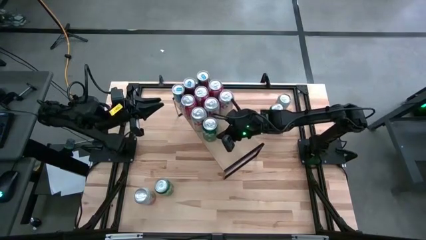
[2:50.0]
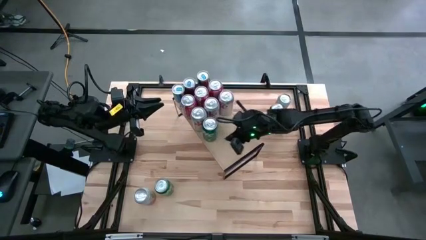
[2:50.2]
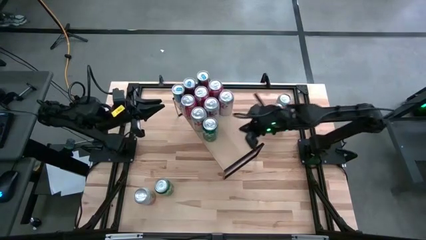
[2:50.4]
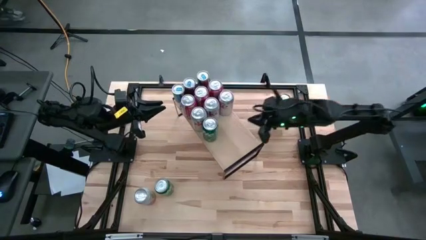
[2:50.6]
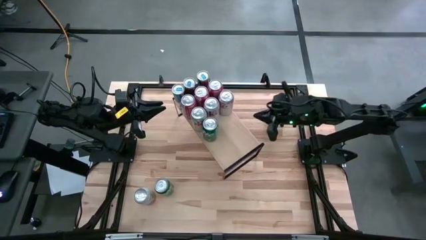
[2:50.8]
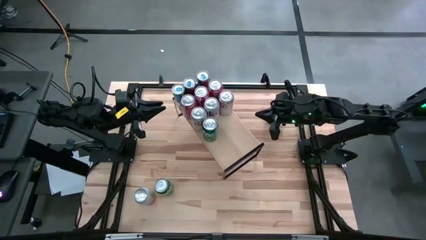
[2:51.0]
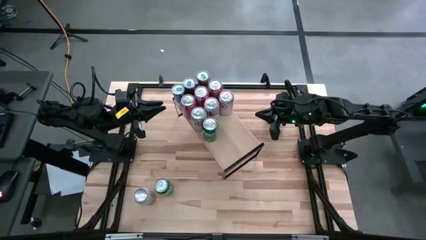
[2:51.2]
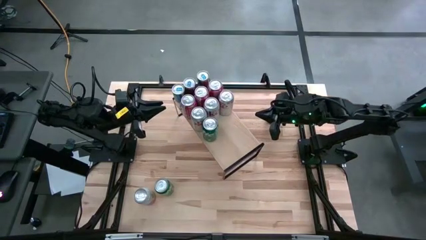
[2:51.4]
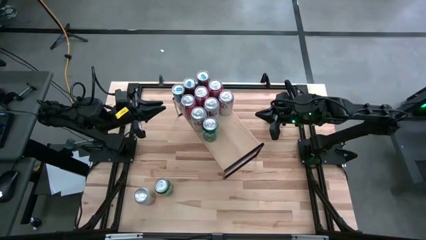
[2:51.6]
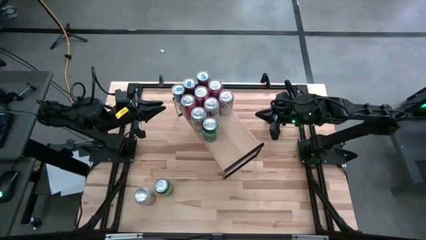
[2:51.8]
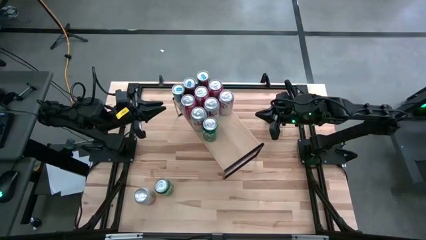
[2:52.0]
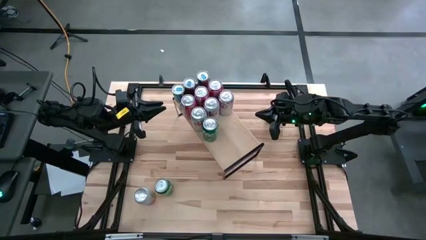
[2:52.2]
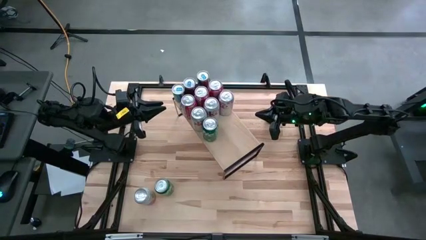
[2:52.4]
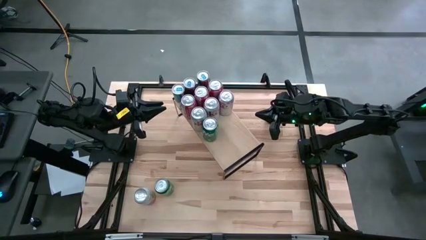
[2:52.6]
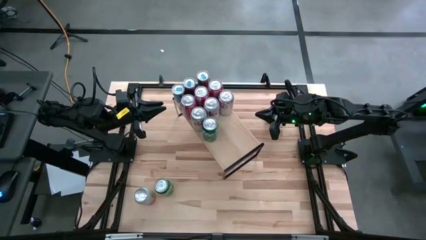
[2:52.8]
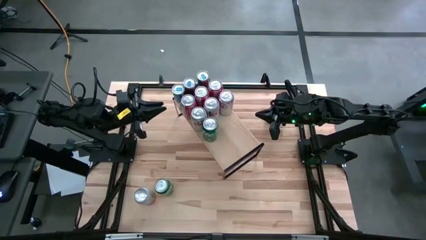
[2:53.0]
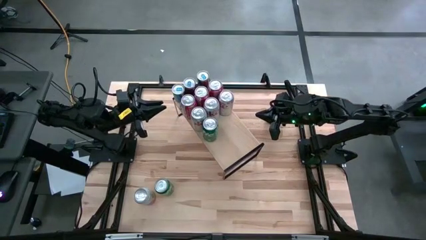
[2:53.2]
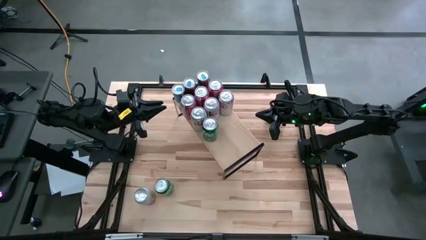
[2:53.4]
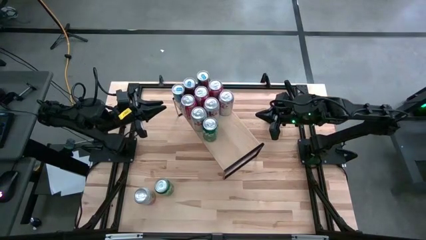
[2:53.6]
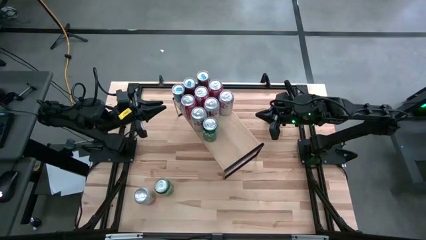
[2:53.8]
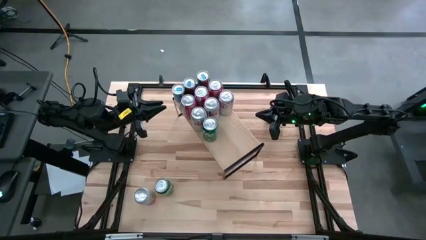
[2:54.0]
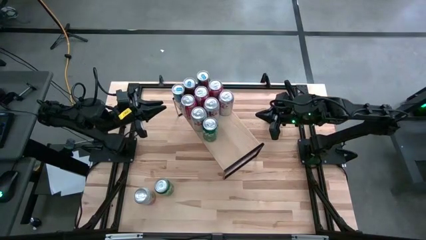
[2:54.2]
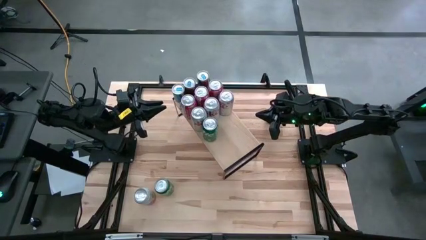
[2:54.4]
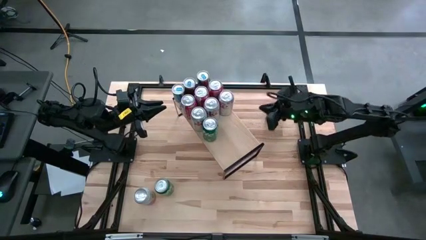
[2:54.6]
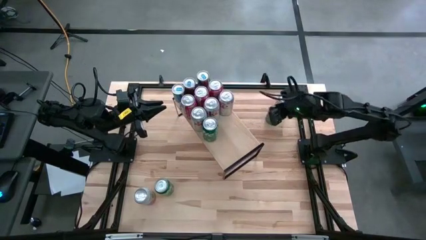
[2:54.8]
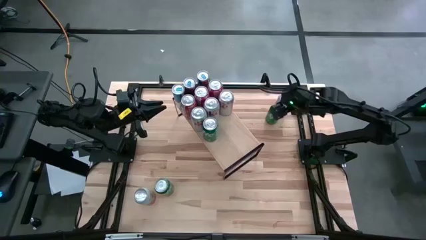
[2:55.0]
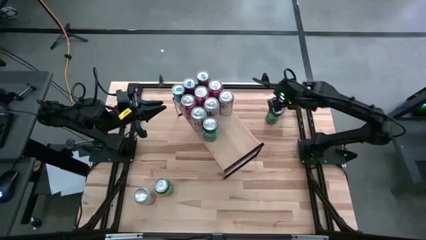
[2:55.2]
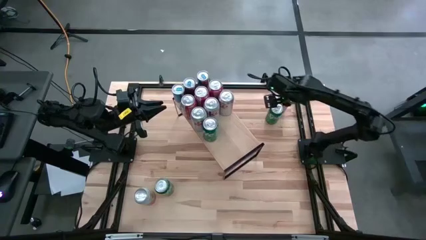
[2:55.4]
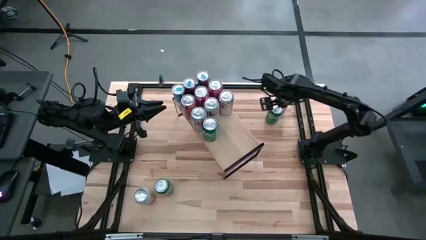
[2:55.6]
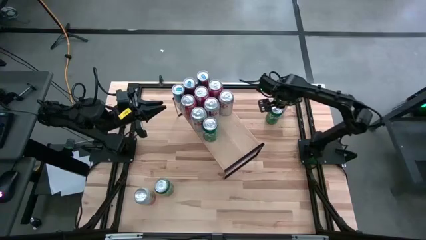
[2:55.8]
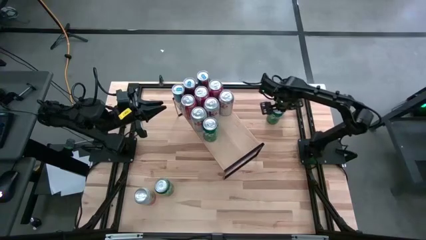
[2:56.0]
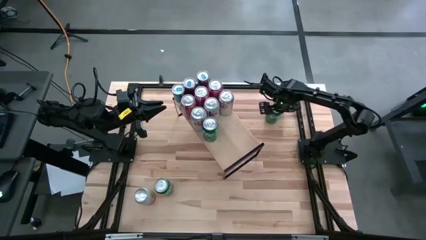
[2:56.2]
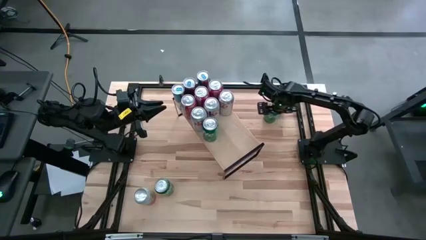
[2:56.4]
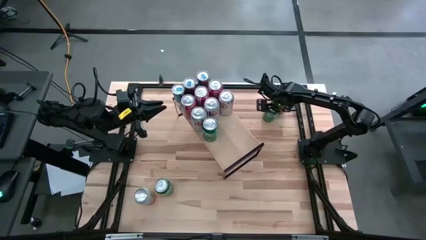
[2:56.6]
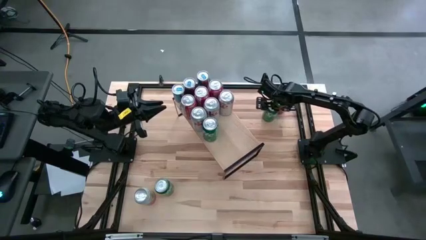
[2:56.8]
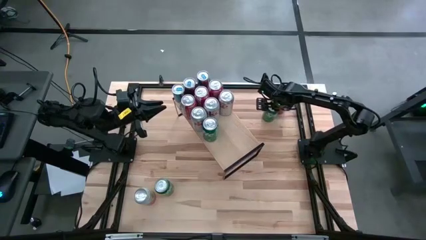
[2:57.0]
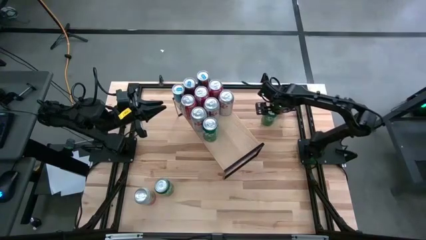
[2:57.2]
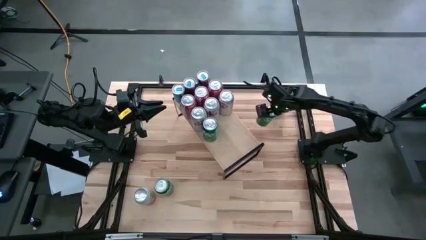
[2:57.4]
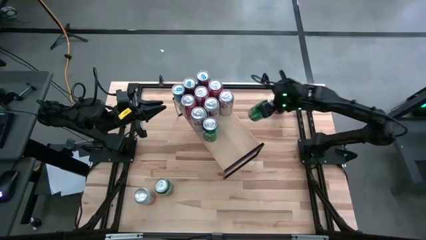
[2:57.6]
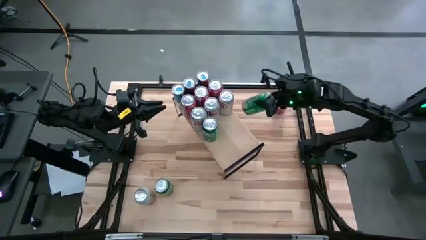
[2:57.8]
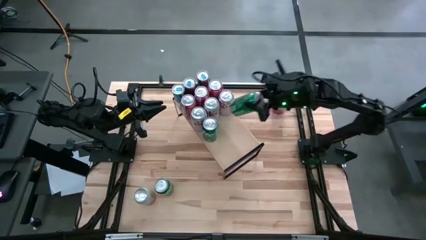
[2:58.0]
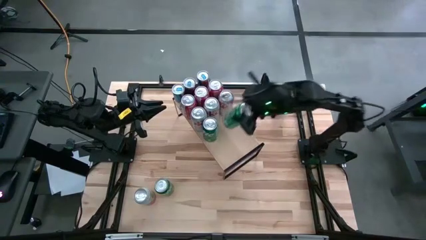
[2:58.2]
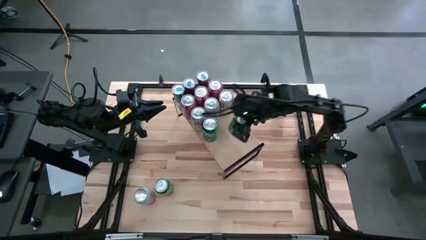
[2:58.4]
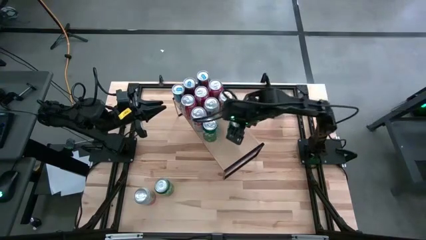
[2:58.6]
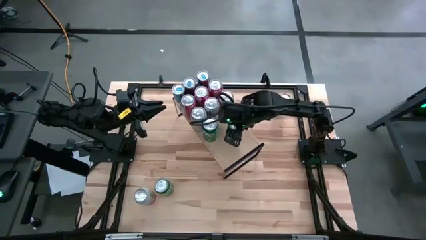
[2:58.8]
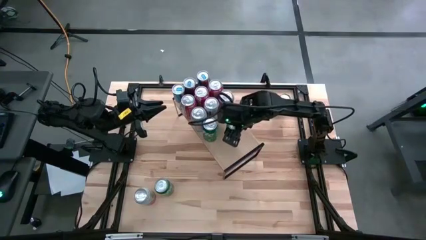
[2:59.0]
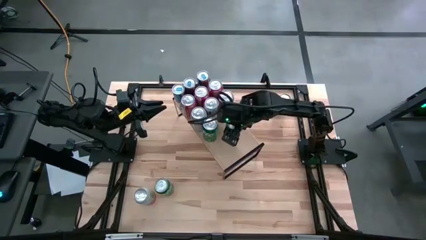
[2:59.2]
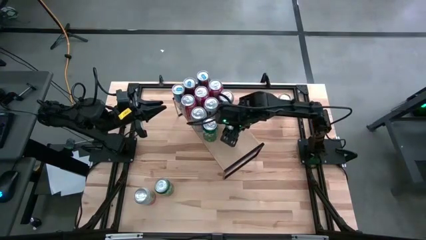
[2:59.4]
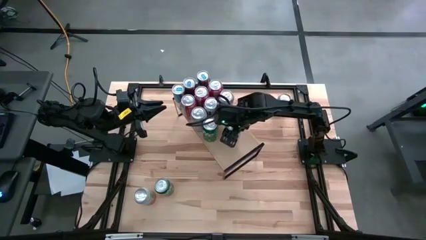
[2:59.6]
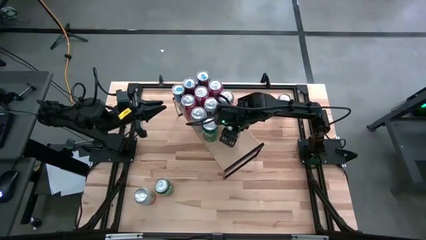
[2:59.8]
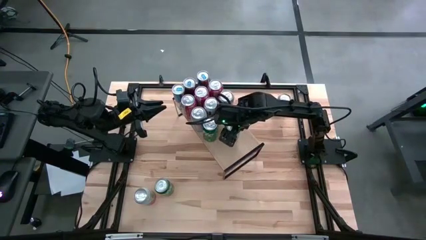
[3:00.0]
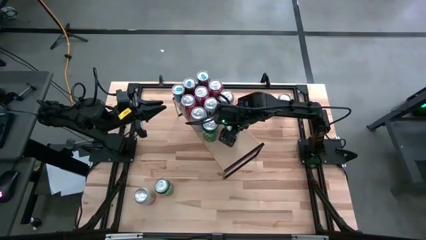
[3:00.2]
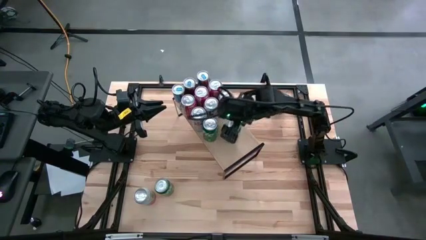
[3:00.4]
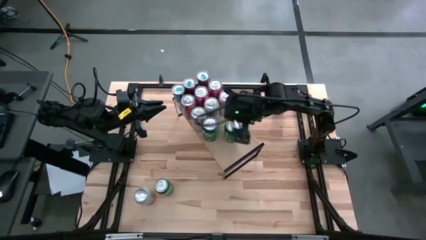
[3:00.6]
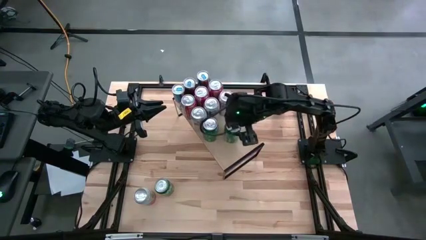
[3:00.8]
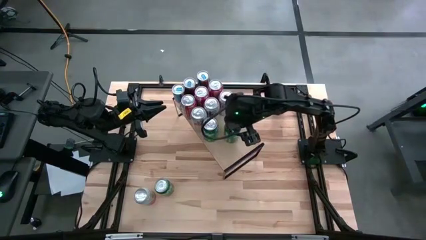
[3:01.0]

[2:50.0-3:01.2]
Task: Place canned beverage on shelf
Put the top green soda can on the shelf aligned with the other green soda can
